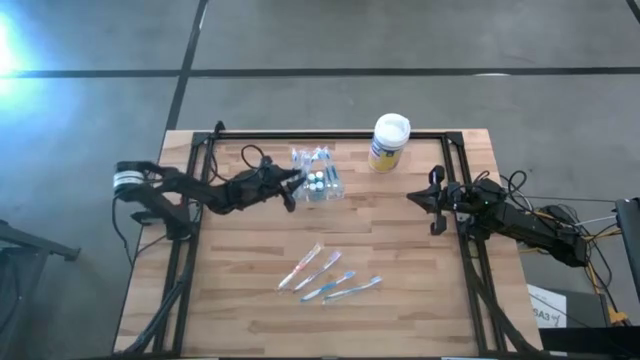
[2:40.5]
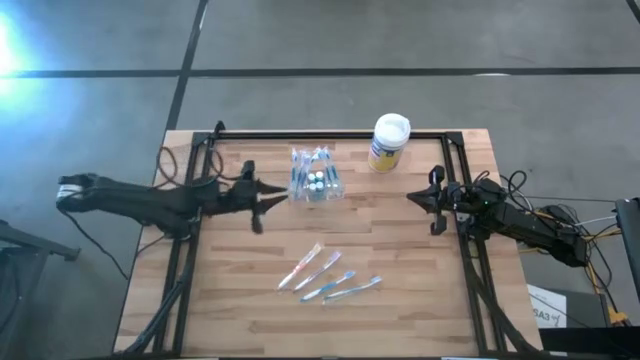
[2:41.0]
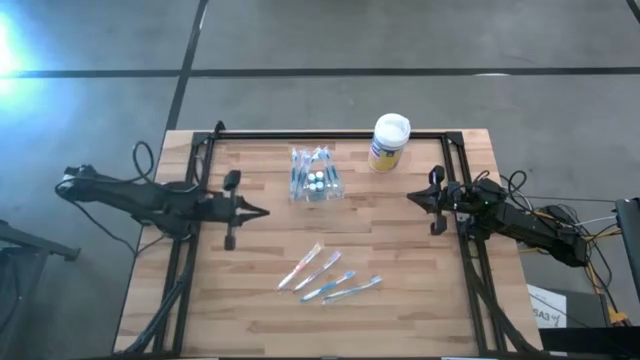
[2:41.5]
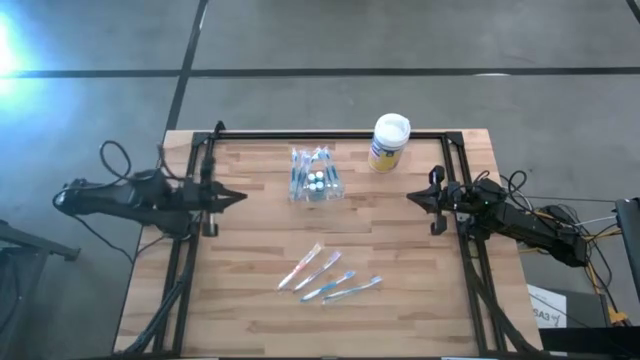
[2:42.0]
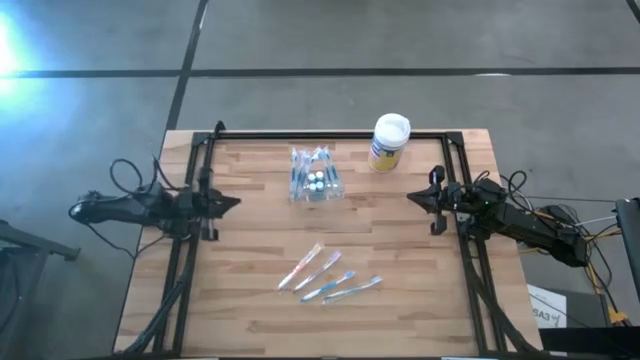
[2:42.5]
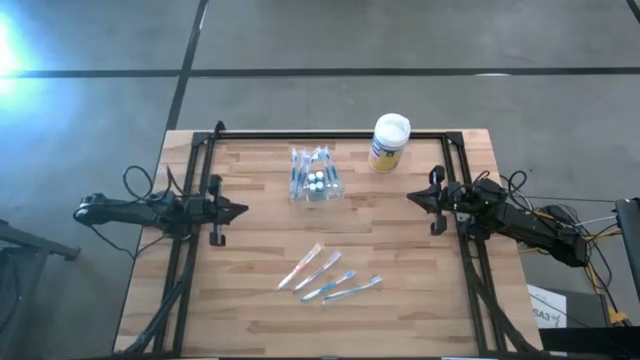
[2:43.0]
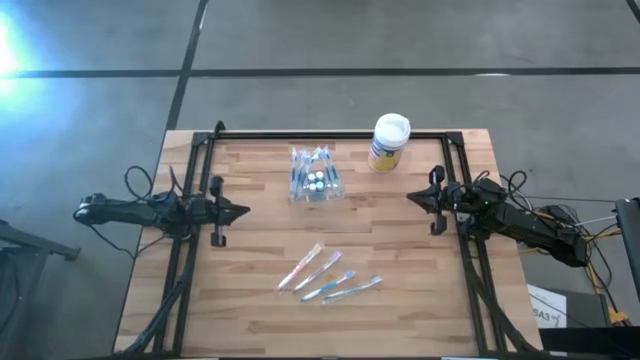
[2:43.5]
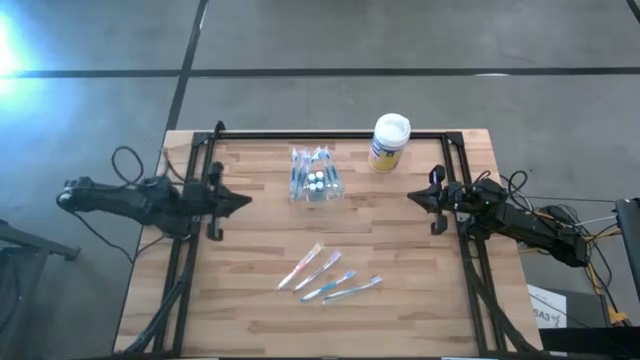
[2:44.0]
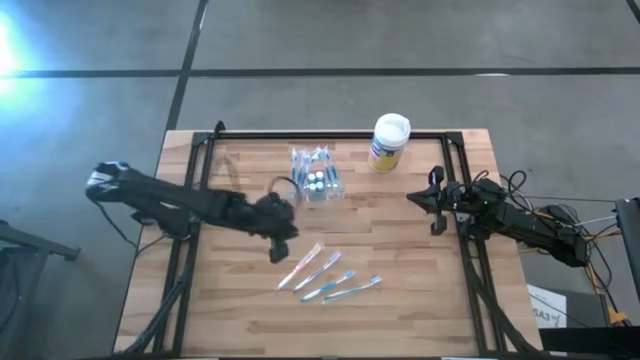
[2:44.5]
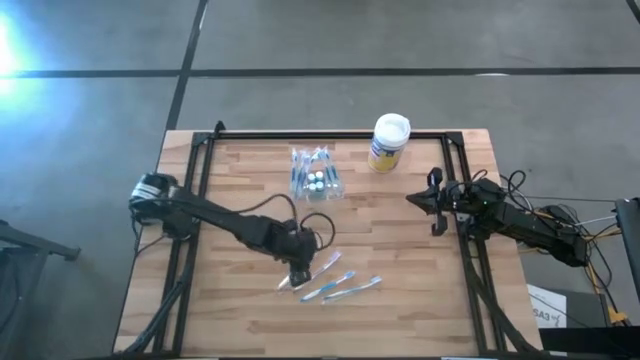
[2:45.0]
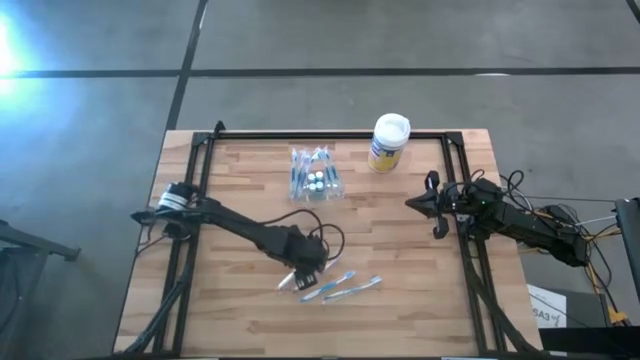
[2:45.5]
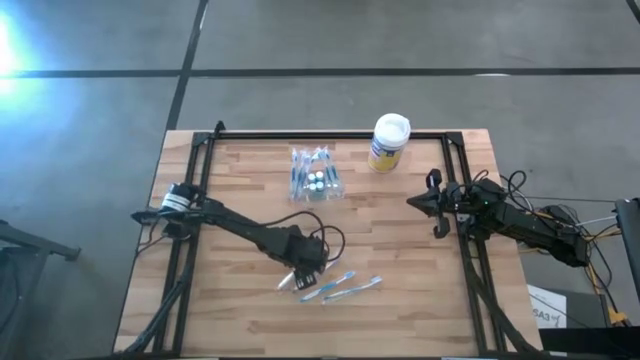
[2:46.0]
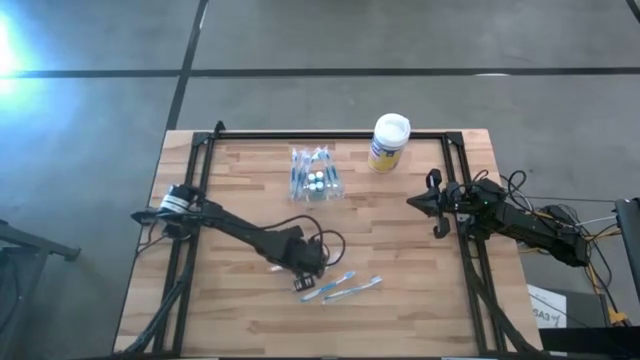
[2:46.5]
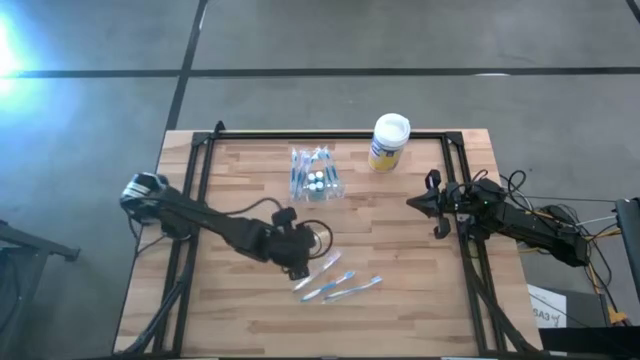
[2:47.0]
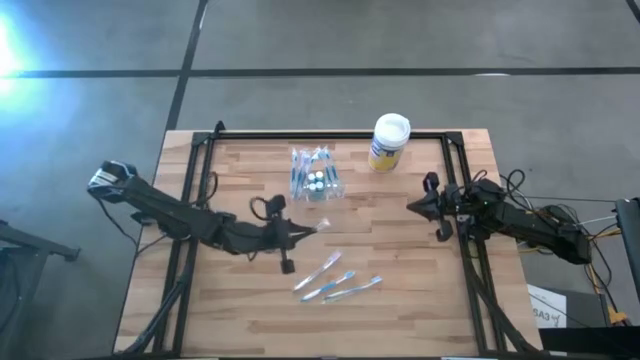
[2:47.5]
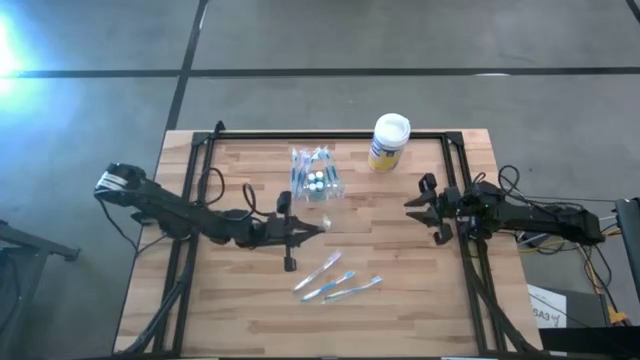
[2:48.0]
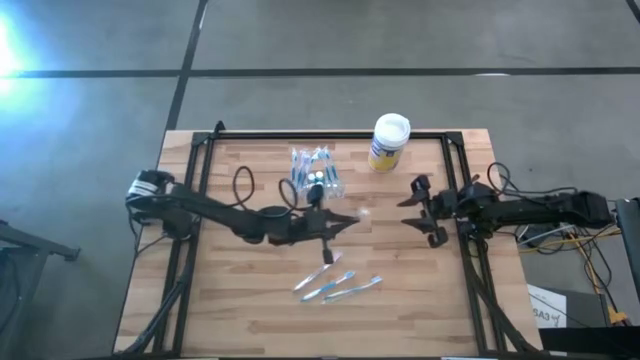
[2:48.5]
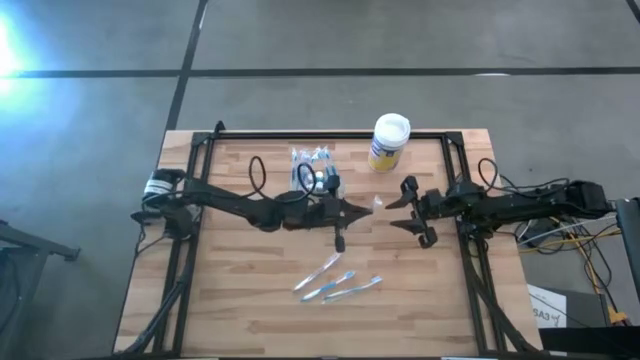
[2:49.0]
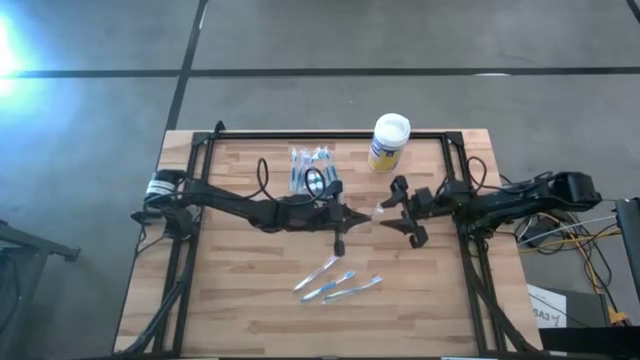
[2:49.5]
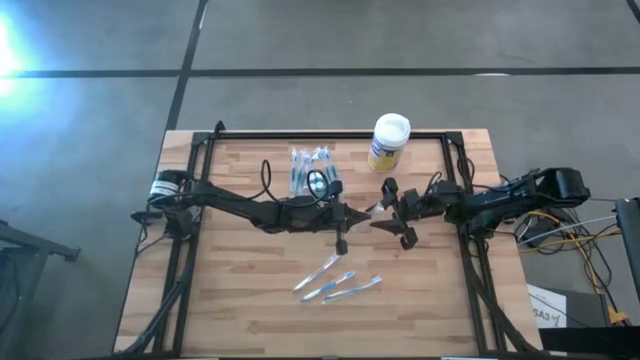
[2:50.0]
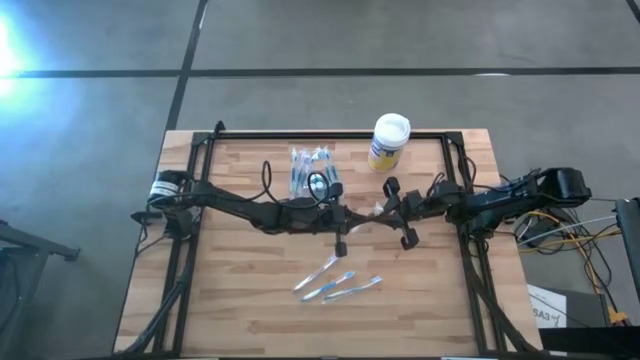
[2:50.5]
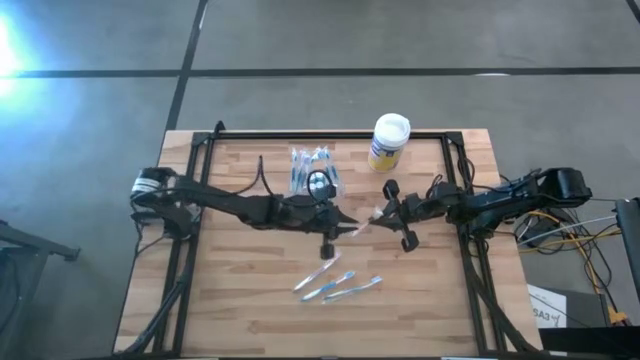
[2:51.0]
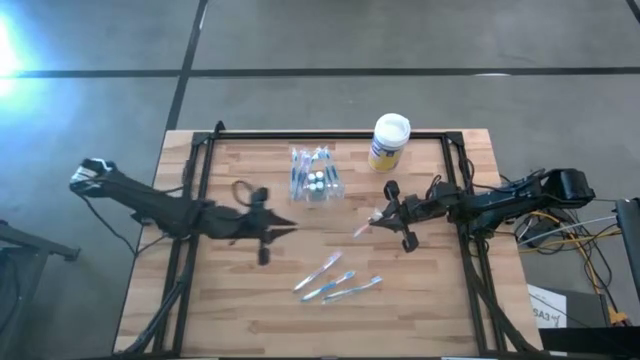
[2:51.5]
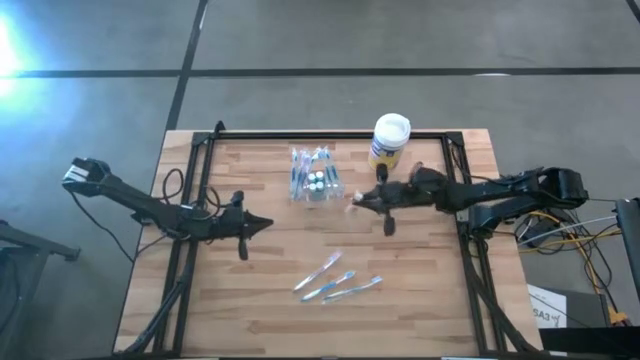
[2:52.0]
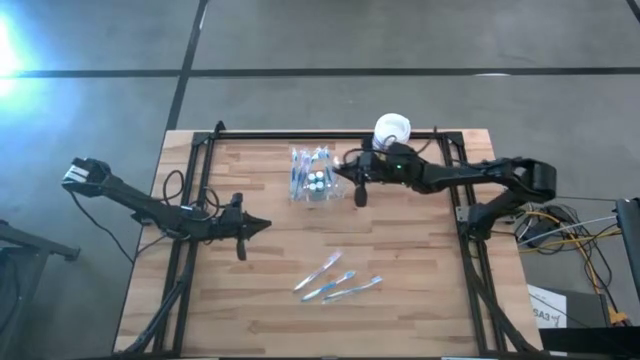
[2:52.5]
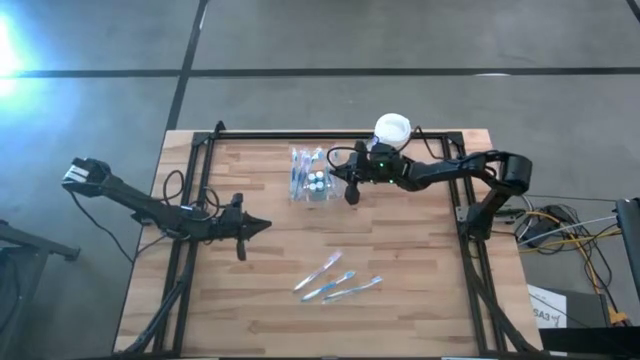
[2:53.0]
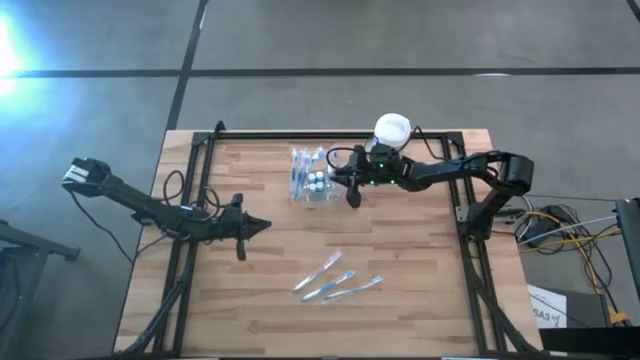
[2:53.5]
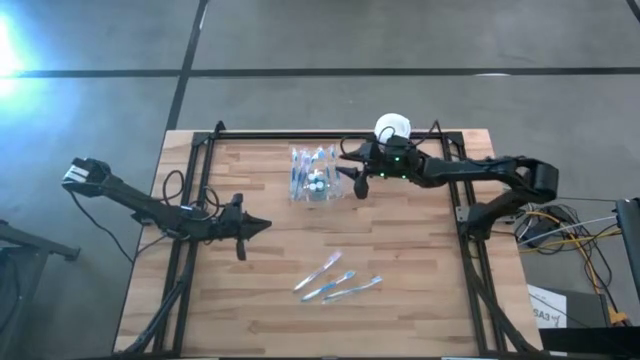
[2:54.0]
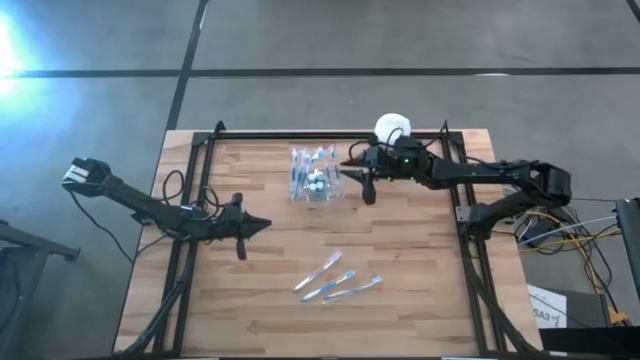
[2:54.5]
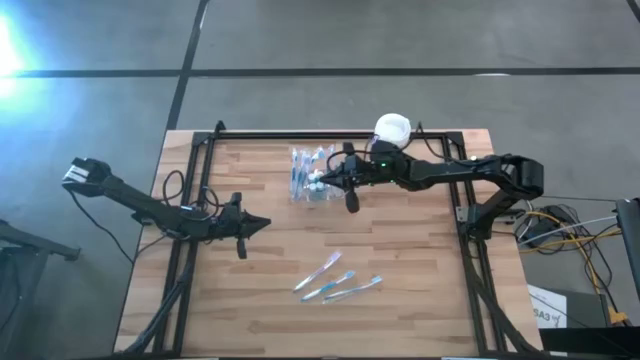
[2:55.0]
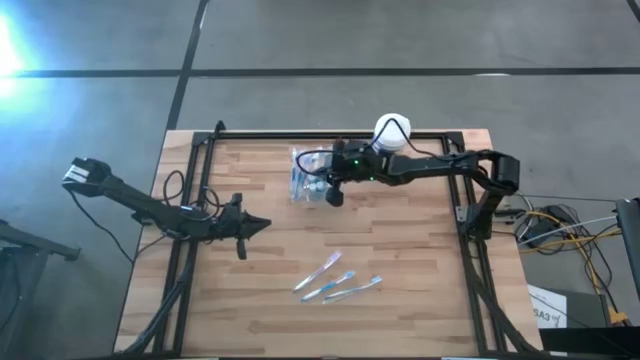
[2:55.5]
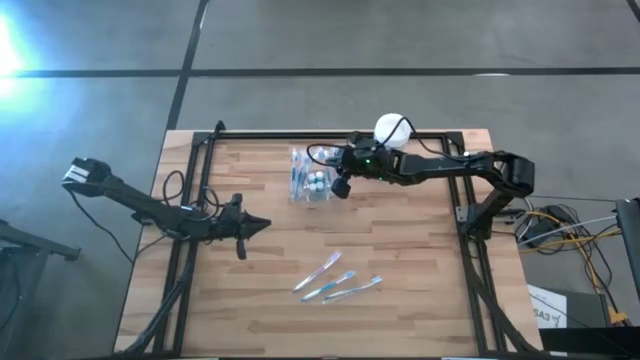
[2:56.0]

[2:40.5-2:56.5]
Task: Pick & Place toothbrushing station
Put the orange toothbrush into the transparent organizer

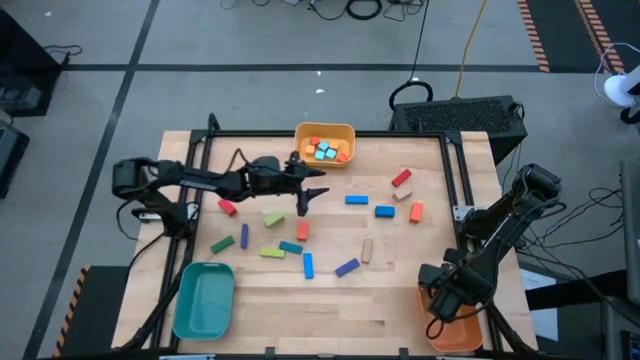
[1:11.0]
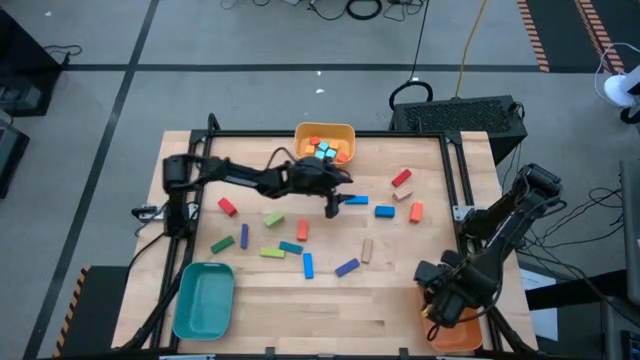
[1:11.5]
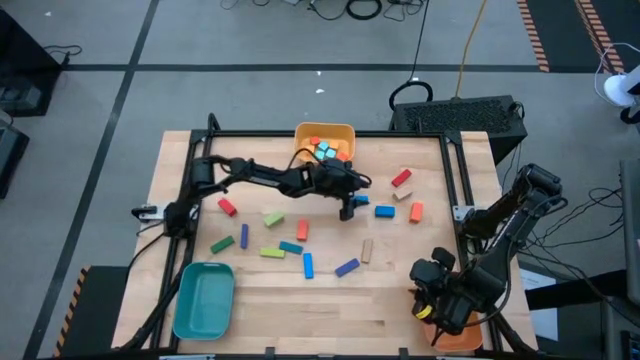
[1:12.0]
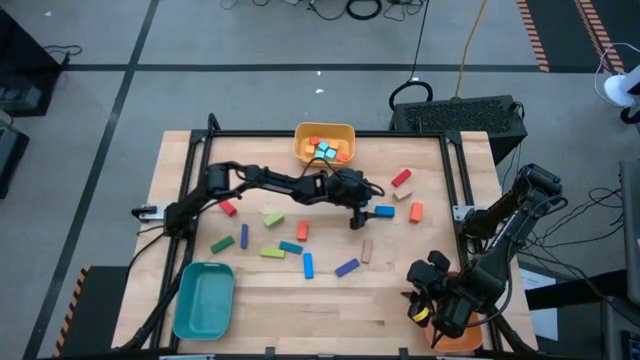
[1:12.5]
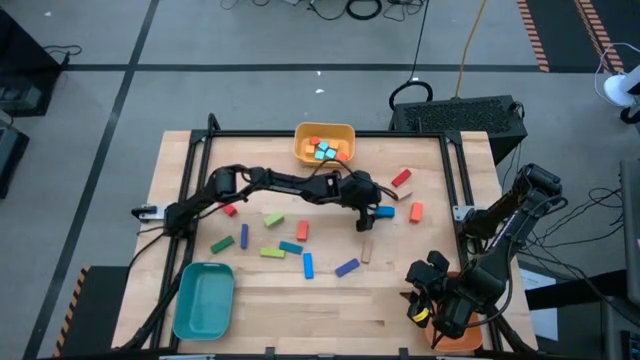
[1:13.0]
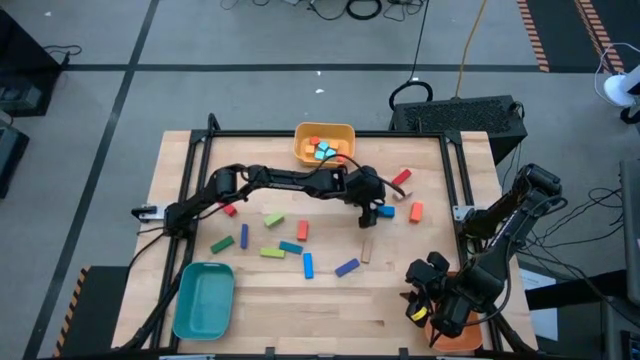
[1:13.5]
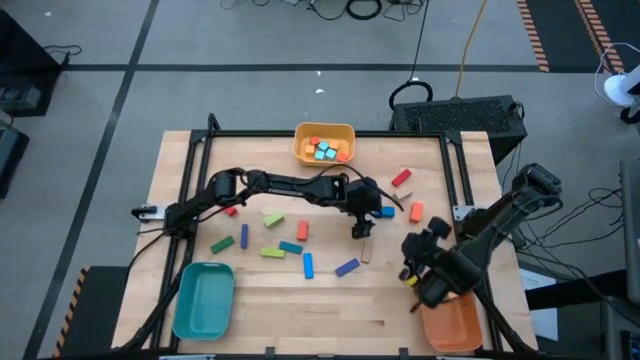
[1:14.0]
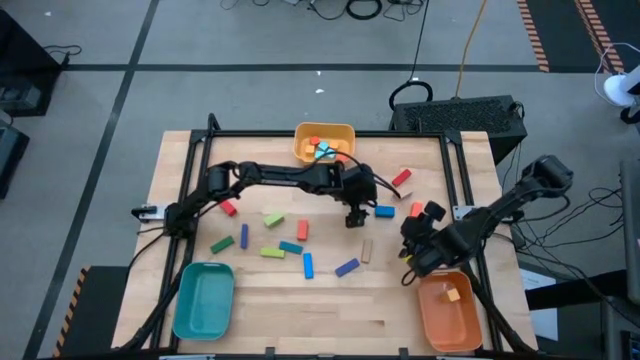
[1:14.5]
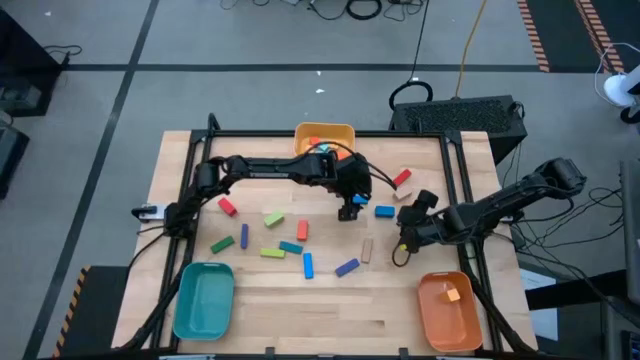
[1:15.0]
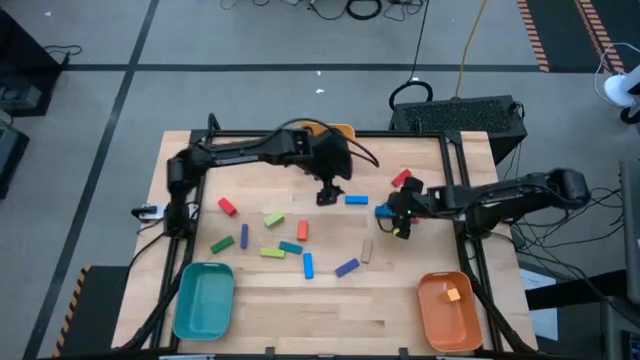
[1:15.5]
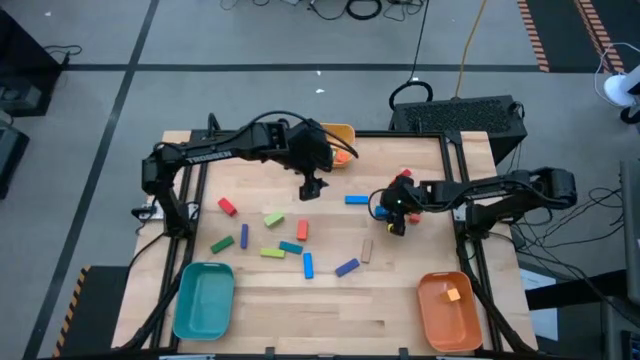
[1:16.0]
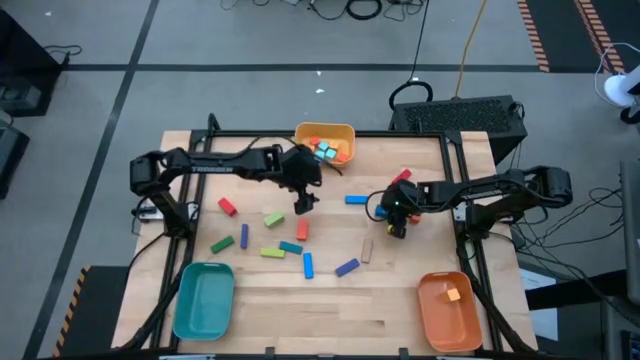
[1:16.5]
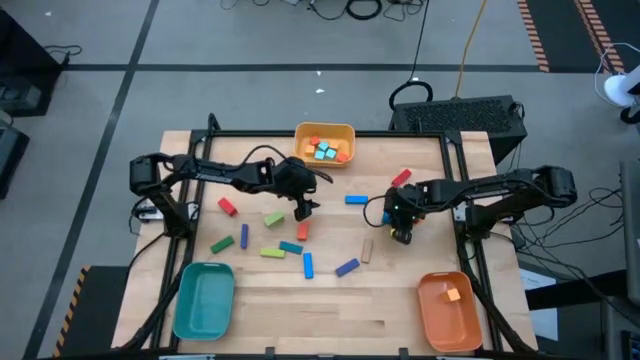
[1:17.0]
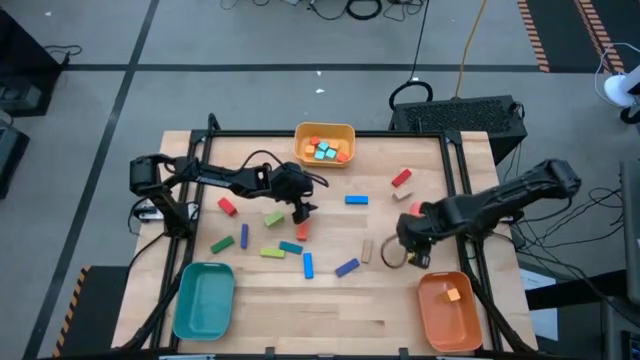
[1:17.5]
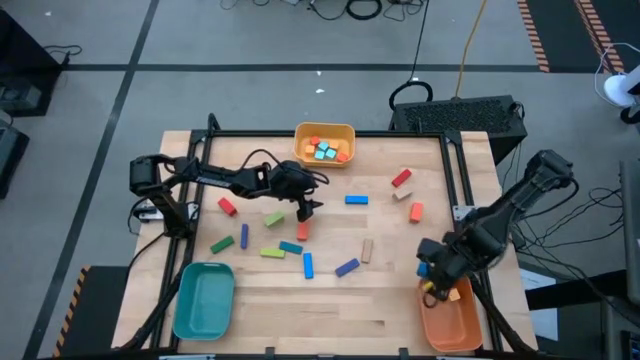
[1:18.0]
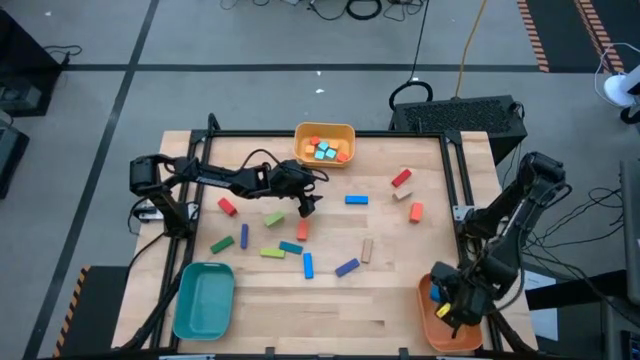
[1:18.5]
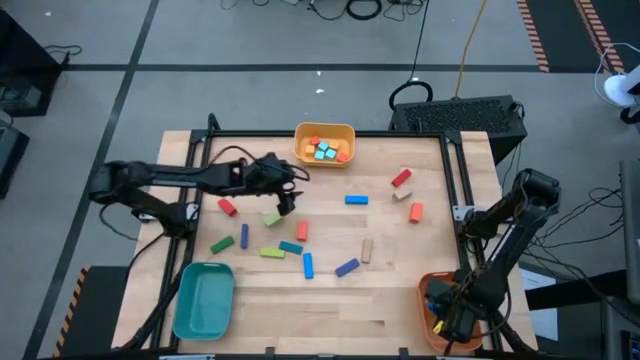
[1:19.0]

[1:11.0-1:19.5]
Task: Sort blocks by size
Put the big blue rectangle block into the orange bin
